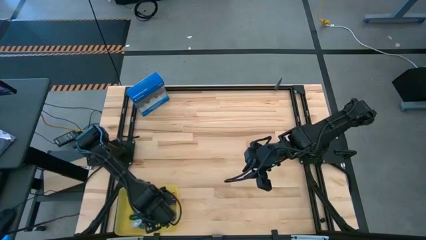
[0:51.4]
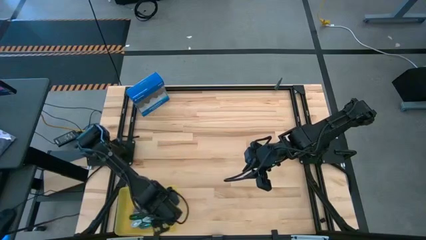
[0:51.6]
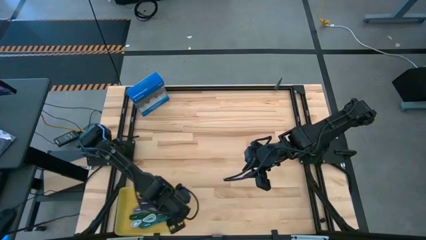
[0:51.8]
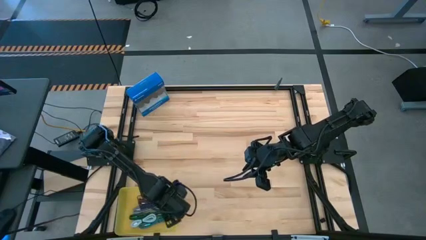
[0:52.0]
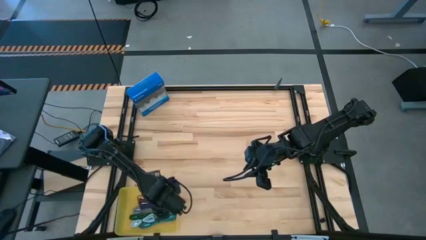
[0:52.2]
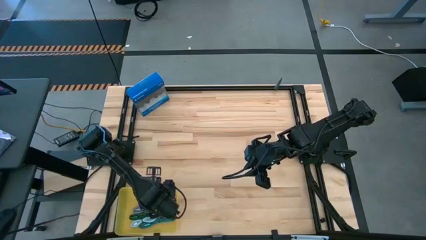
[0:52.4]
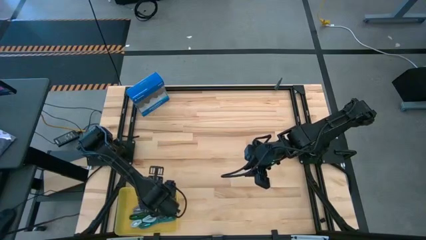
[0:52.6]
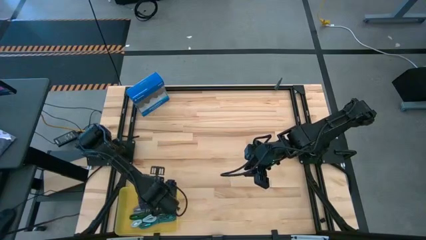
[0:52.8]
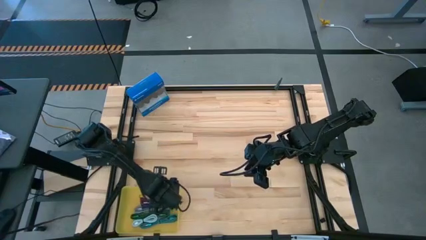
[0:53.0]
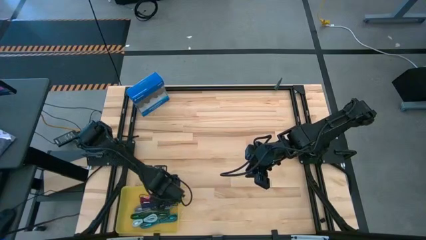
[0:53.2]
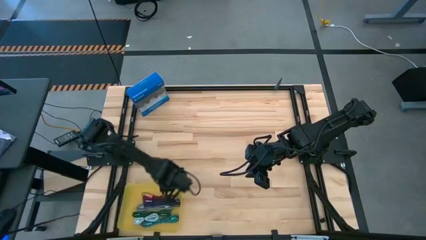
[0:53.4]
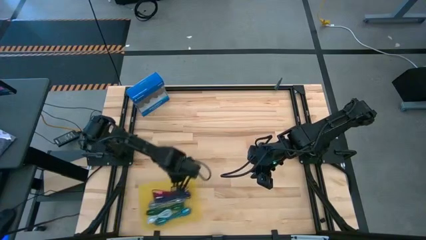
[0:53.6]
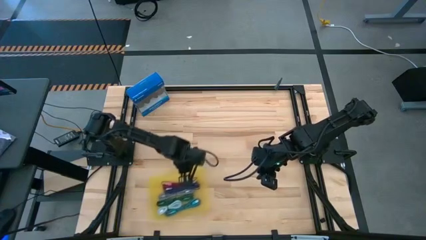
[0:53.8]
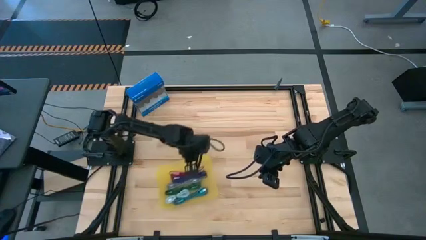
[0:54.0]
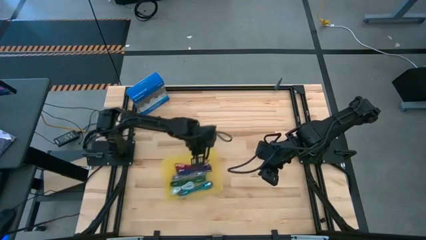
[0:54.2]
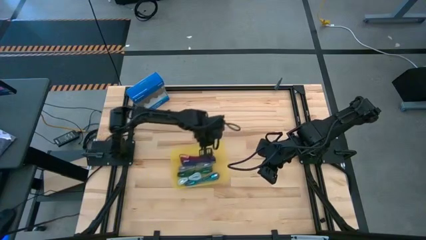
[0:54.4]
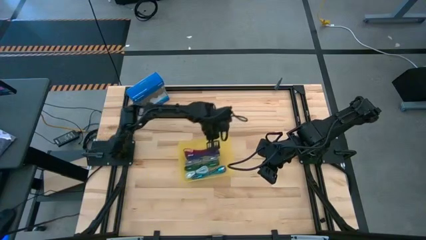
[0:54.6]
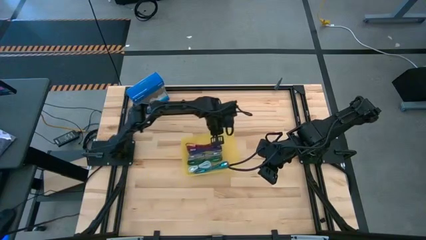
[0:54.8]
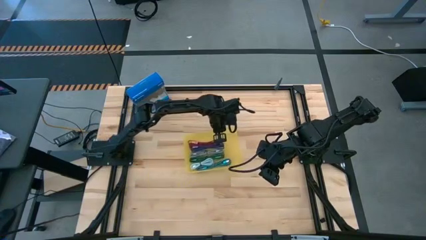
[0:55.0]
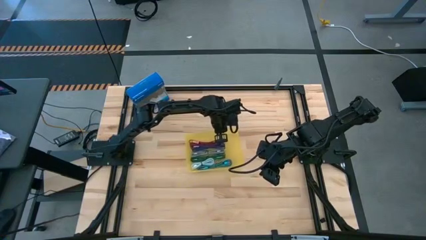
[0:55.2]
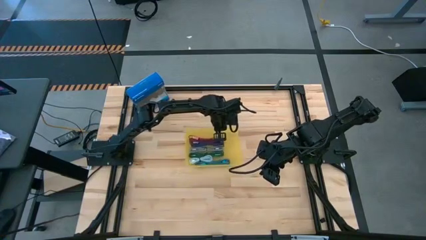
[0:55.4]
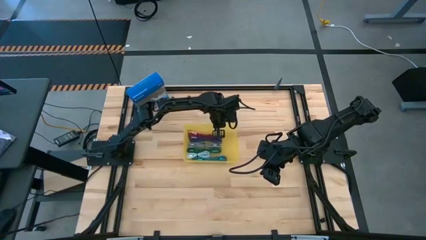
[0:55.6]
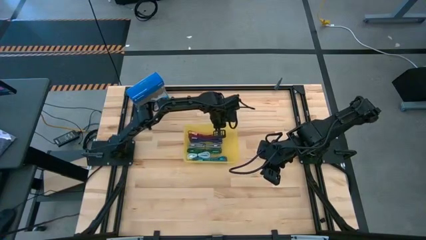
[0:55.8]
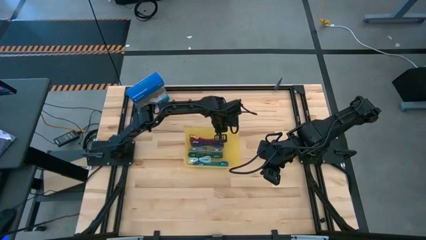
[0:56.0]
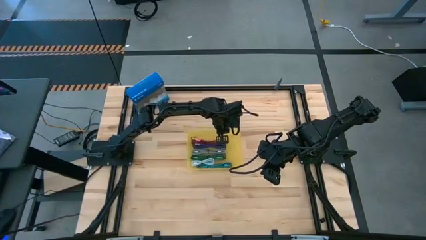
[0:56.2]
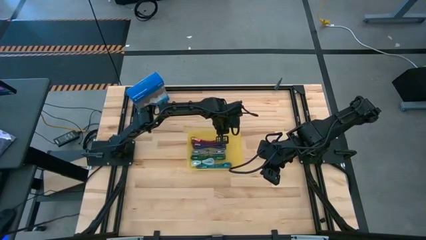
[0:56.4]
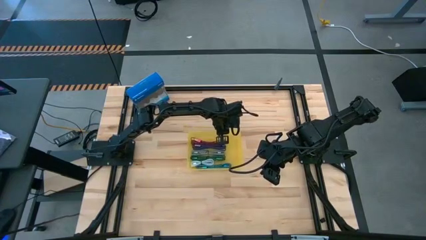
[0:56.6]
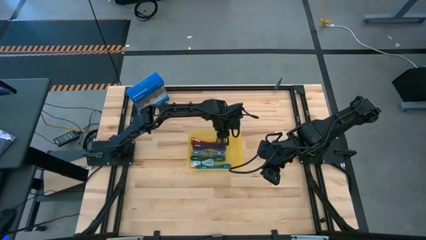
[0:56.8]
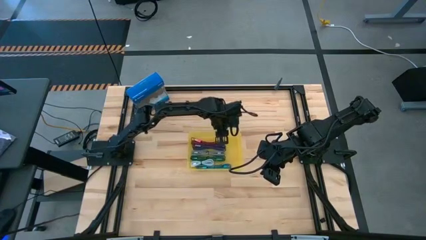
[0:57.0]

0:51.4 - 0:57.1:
Task: Pick and place USB-C Cables
Move the yellow bin to the center of the table

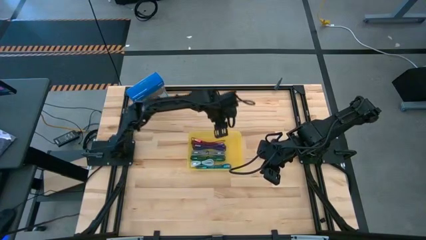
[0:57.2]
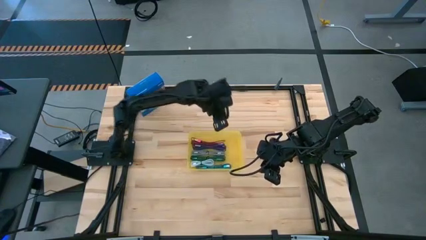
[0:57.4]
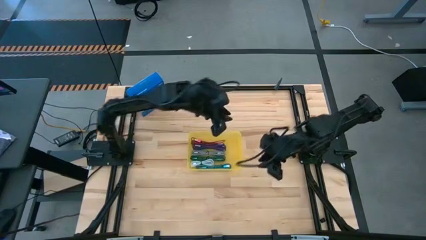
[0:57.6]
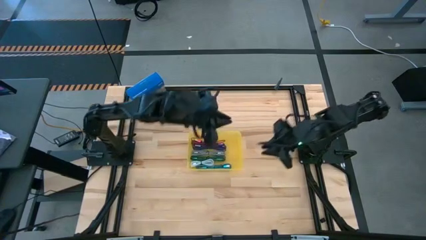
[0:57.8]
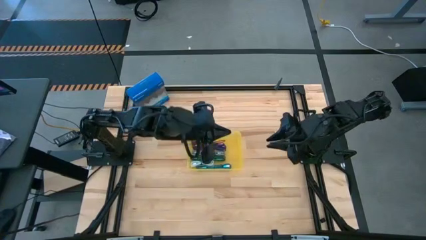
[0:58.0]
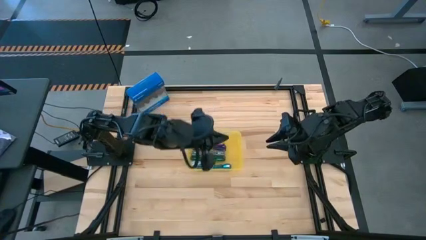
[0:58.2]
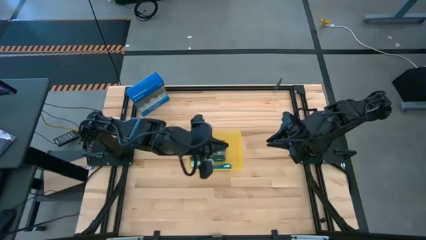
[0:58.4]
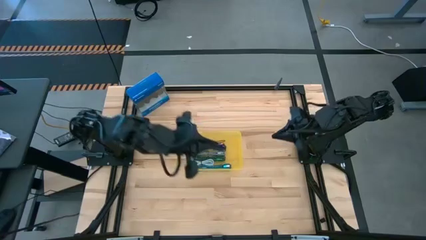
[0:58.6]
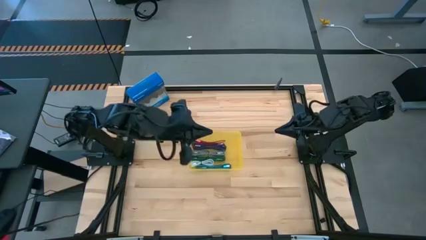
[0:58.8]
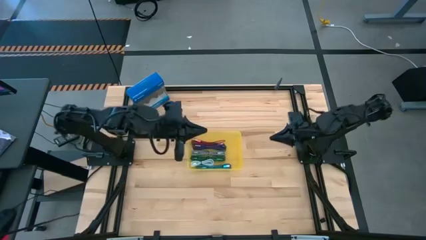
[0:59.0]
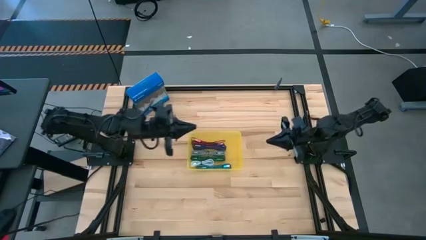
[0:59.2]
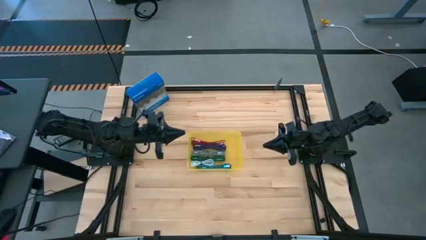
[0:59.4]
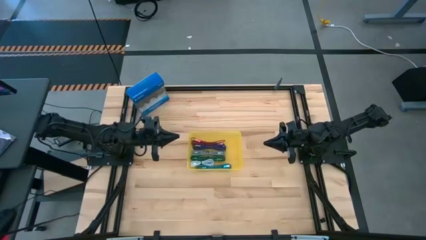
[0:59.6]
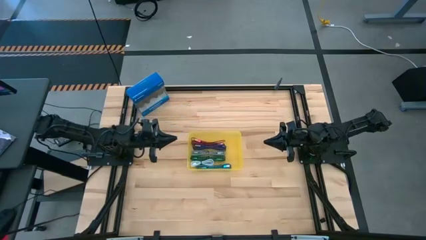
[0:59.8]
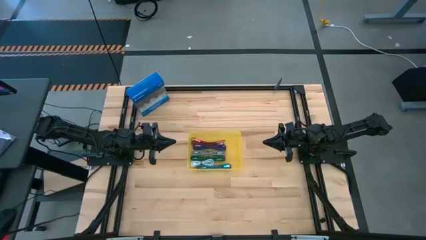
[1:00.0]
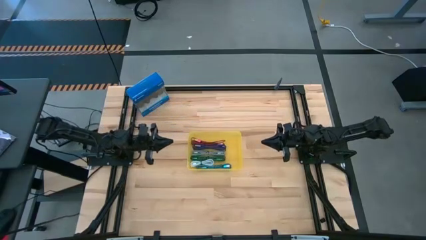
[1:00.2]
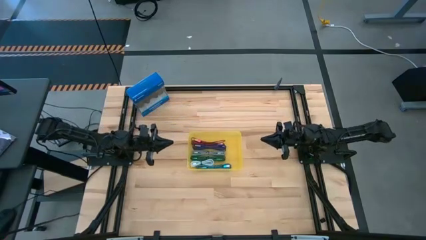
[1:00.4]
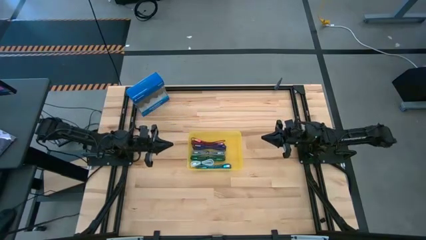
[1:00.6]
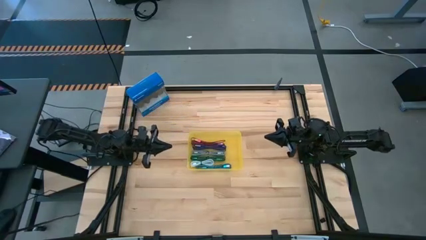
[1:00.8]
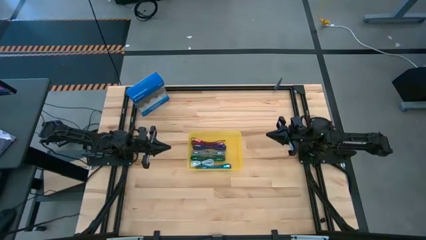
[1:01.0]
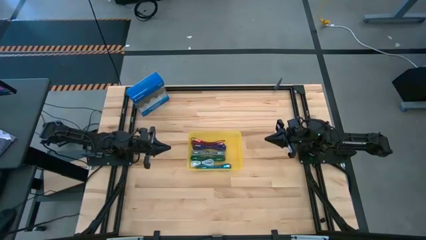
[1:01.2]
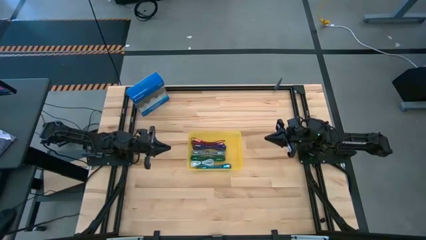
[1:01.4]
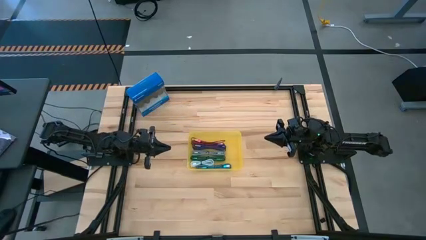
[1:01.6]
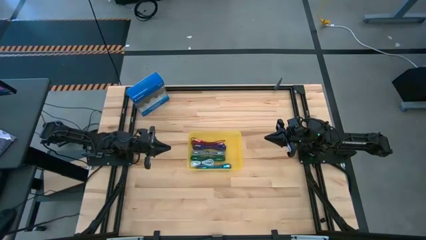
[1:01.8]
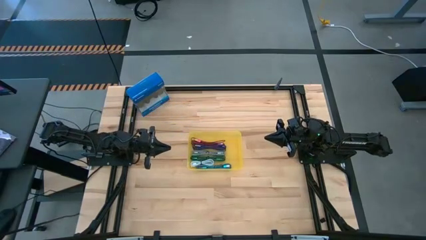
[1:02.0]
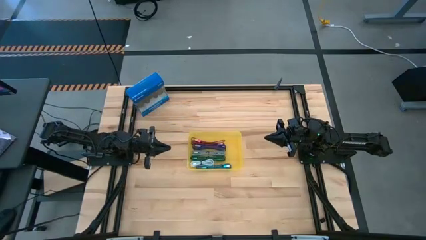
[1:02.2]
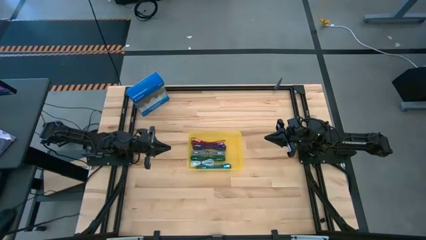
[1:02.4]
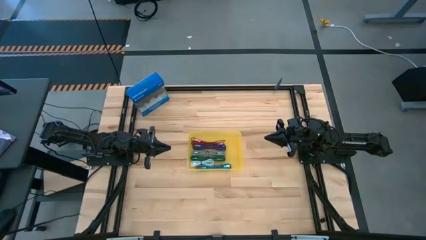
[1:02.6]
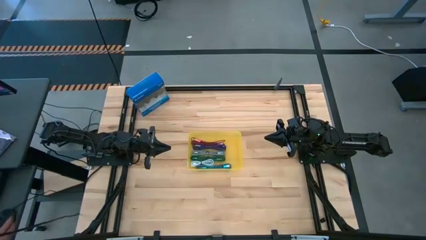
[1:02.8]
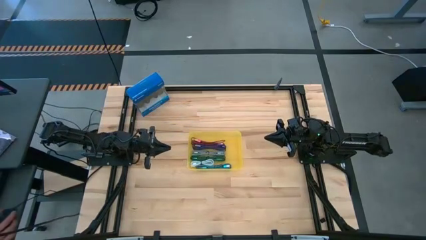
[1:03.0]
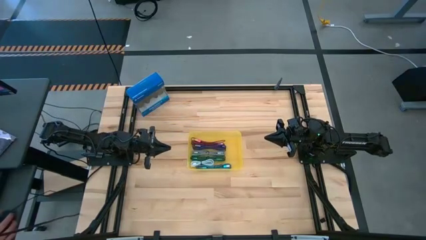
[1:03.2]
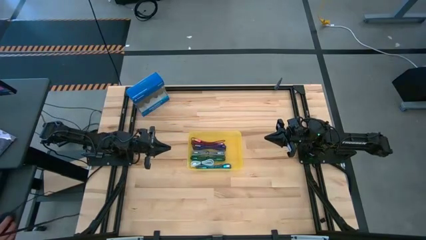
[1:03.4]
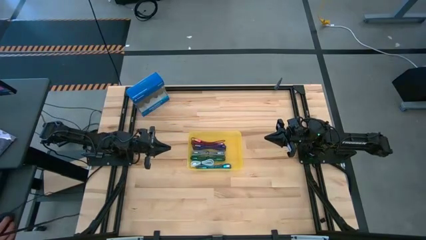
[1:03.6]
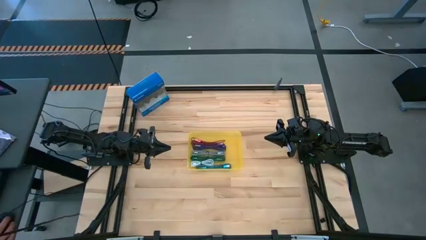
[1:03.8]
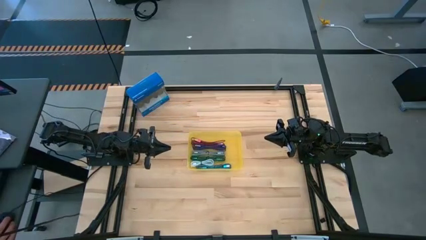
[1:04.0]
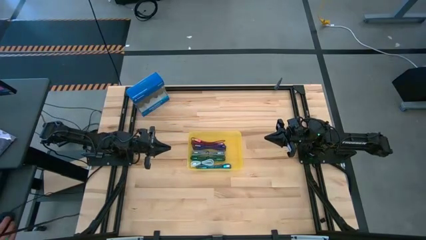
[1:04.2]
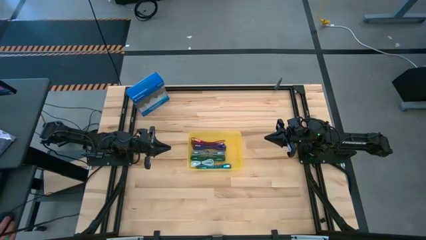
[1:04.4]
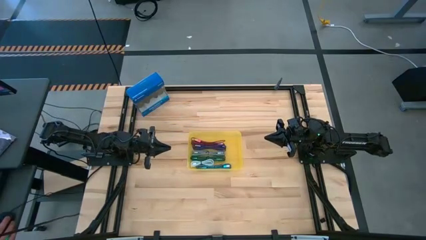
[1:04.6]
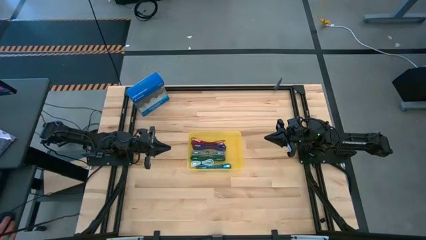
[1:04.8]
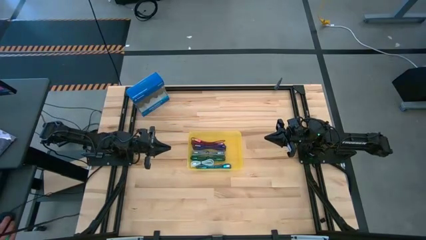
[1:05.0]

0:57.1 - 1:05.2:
Return to Home Position

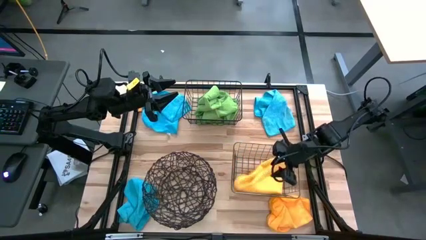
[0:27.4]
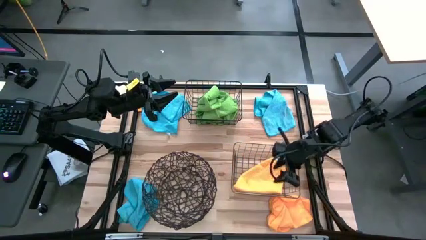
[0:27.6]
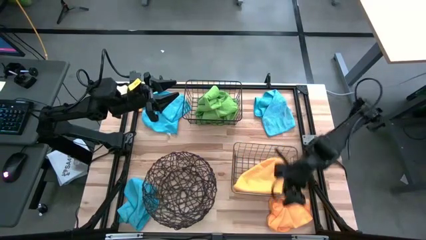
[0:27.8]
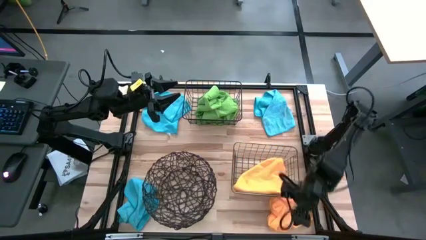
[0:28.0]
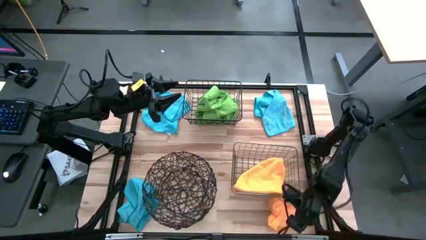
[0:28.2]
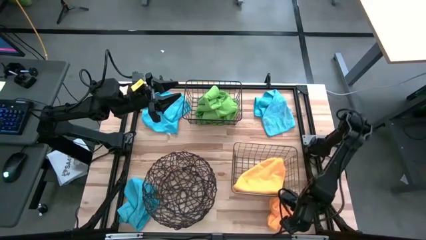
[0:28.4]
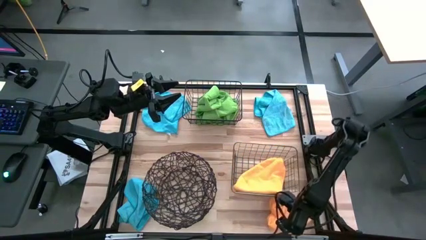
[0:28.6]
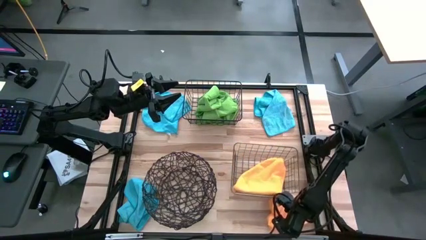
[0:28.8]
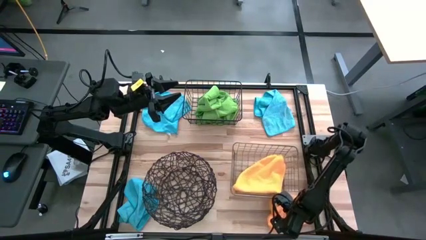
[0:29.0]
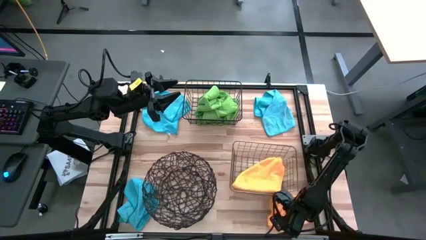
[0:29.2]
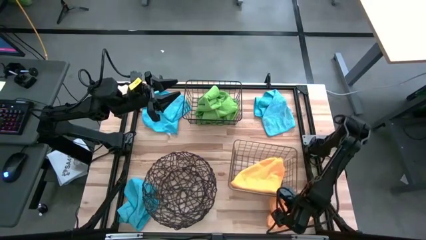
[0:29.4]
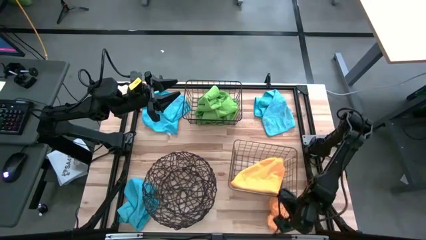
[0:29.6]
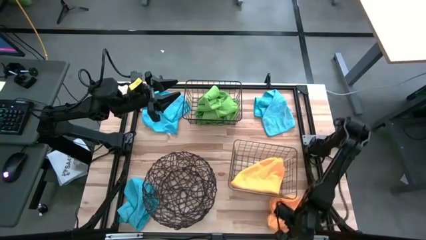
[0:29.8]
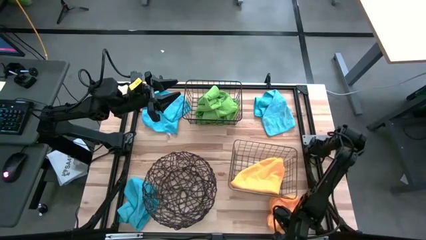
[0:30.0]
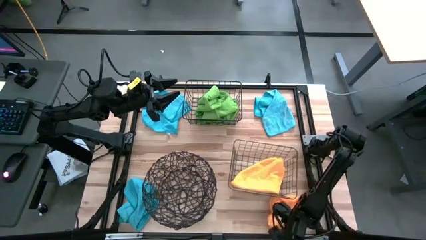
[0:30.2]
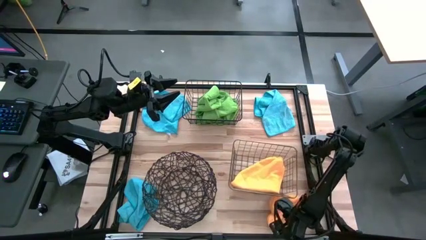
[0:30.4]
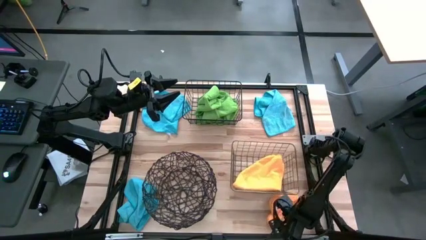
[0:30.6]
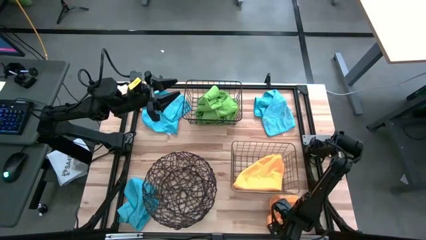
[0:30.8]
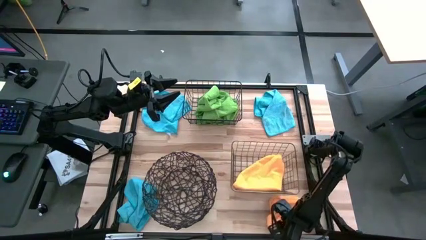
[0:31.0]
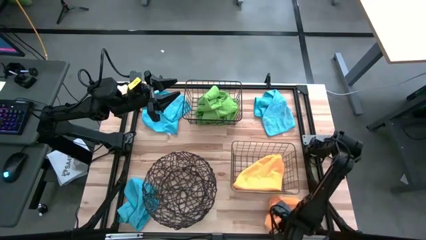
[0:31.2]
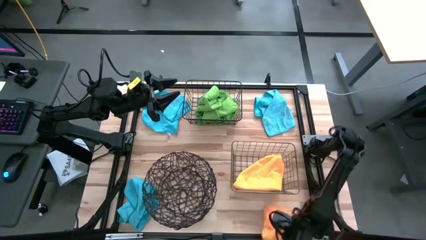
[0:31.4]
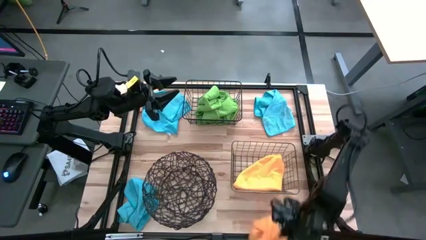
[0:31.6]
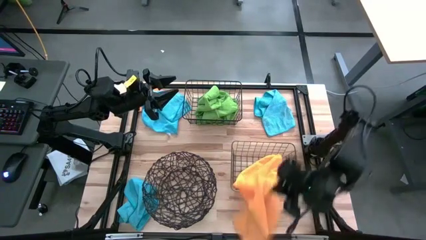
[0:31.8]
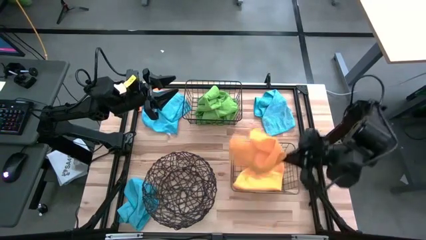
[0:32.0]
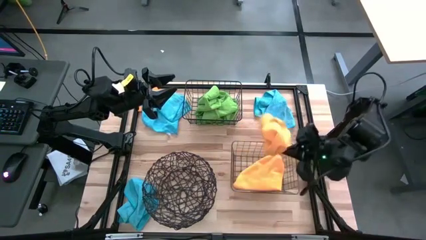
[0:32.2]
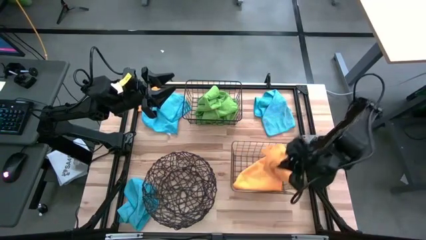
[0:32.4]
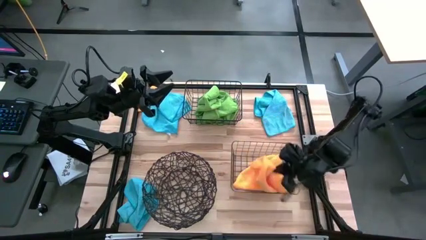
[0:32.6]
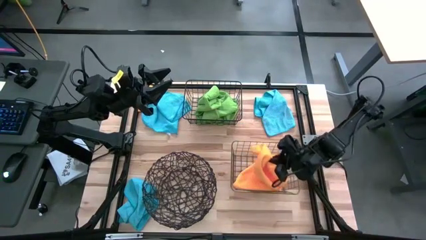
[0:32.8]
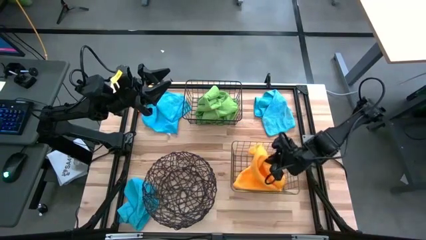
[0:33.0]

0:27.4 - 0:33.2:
Task: Sort microfiber towel by color & place in baskets
Put the bottom orange towel into the gold wire basket
